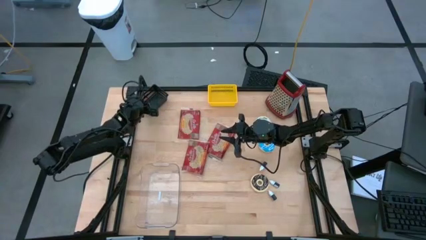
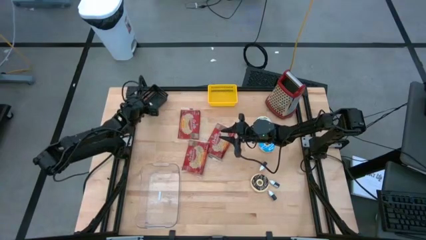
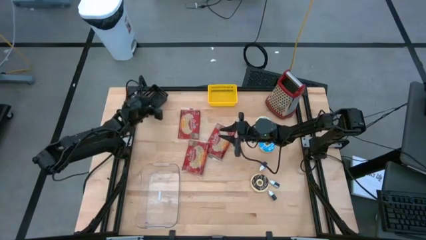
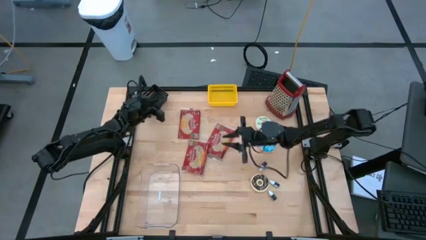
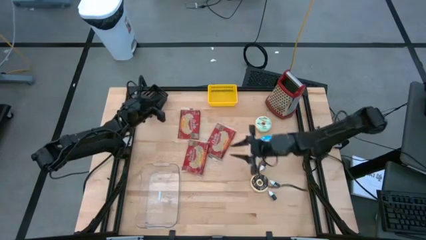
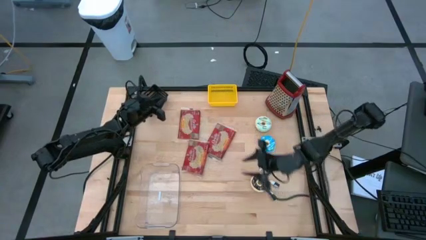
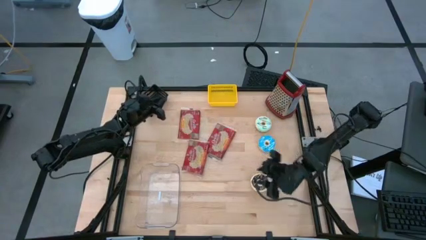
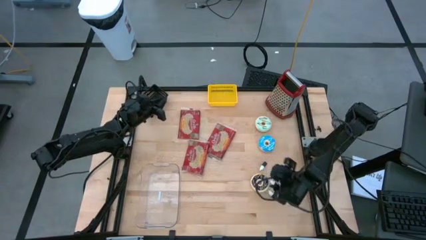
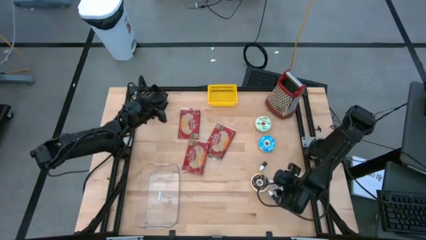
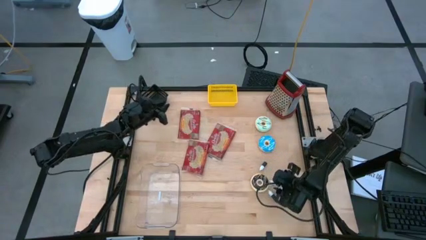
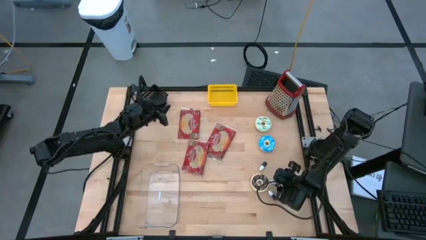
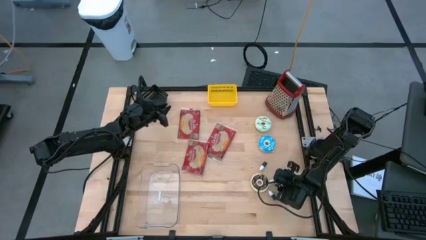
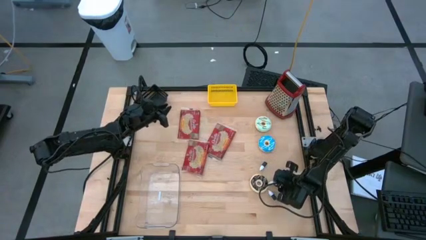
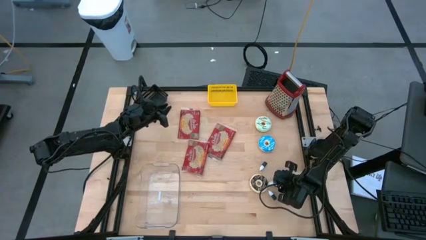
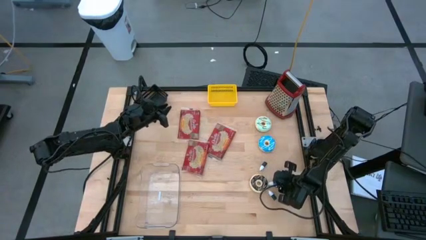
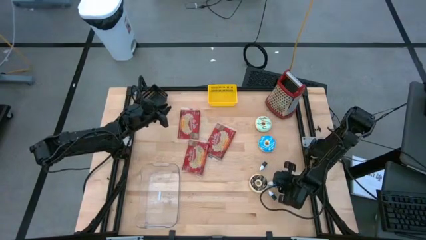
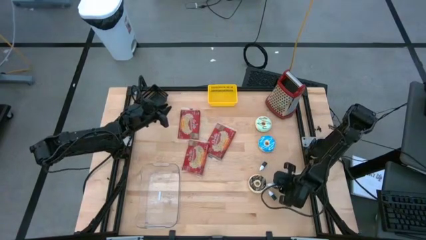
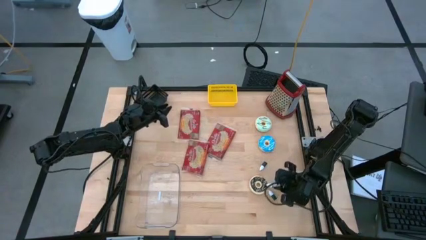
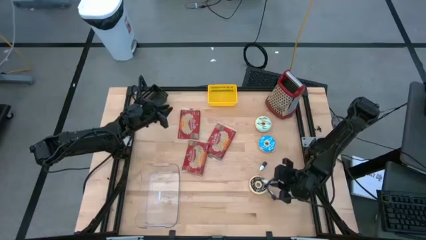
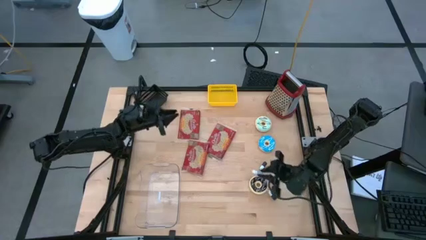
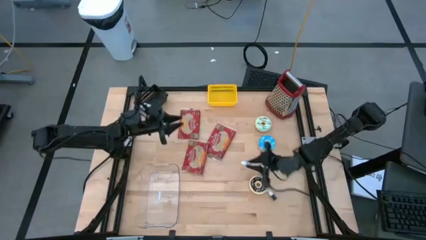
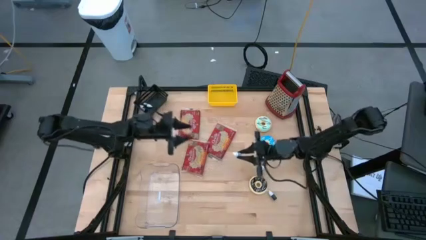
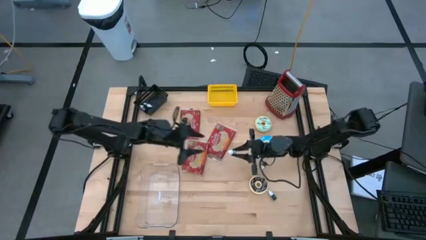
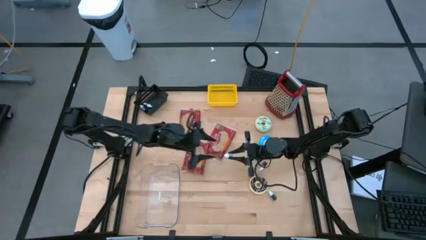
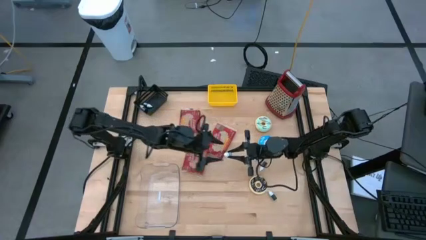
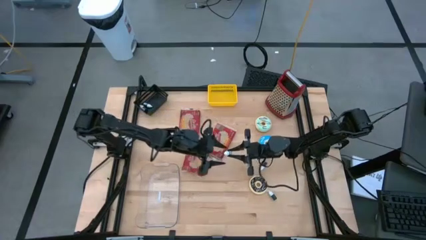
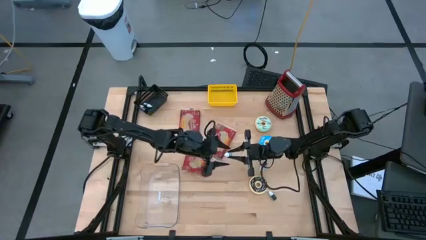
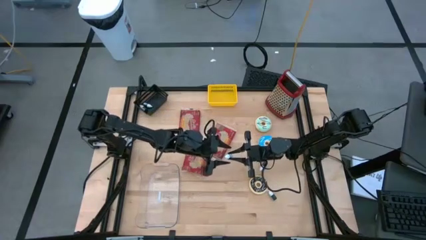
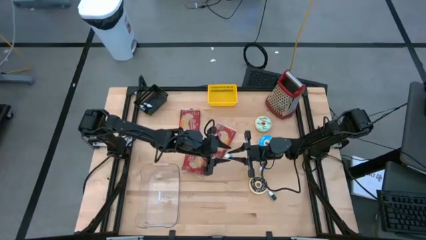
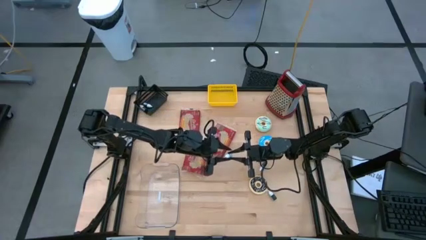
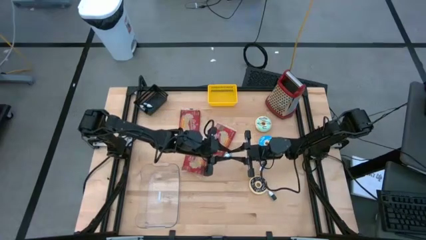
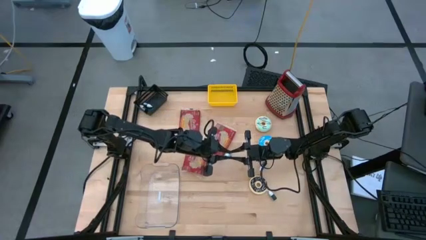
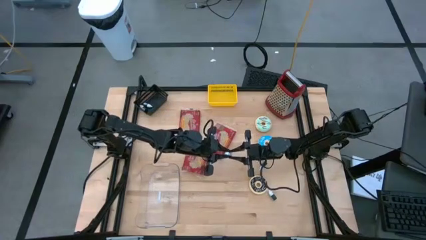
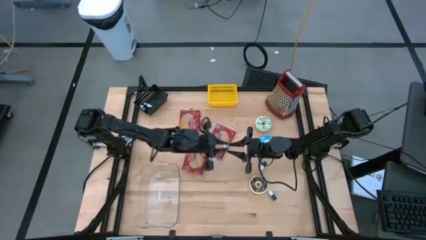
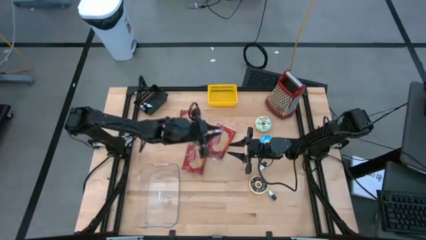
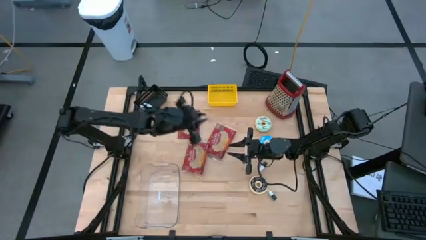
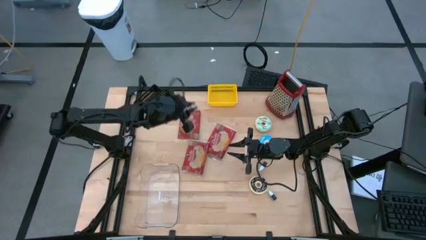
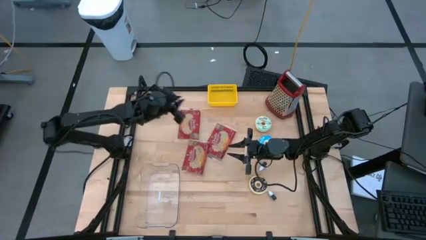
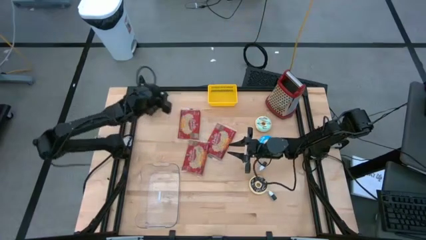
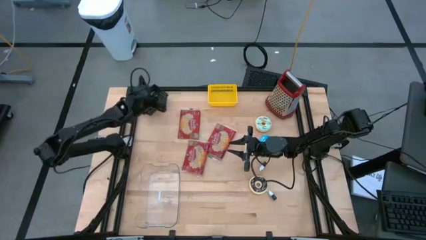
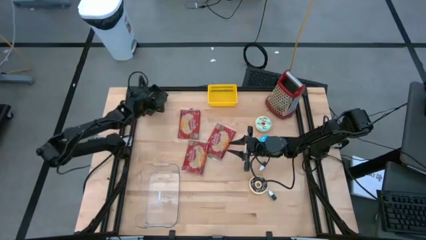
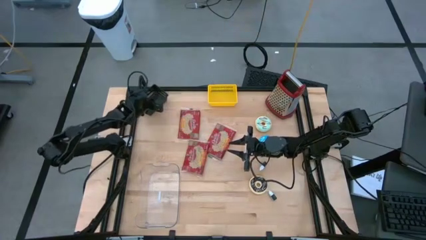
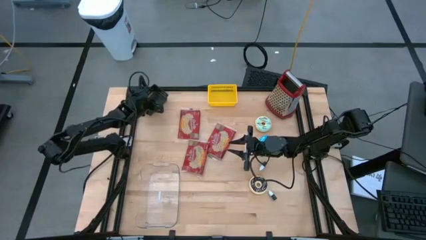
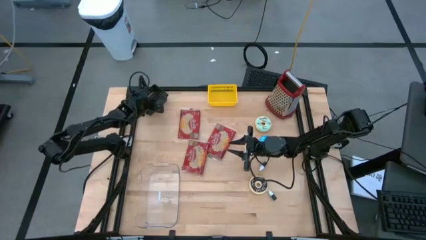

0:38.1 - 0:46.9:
Put the small blue food coloring bottle into the black bin

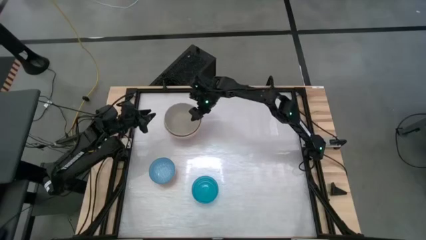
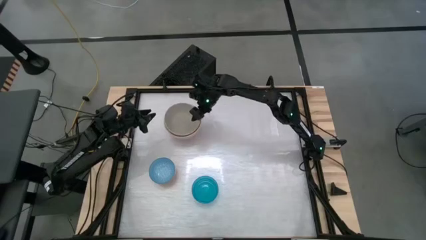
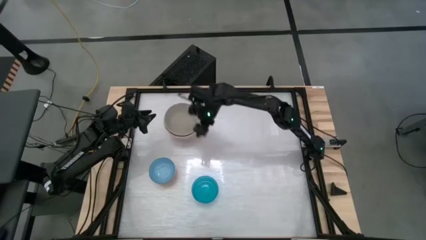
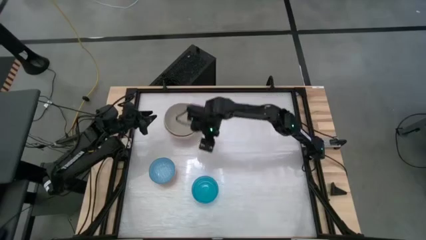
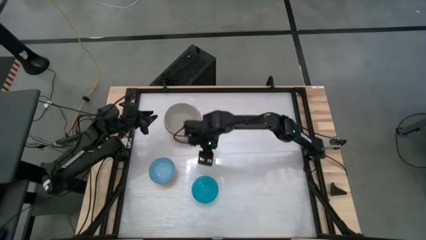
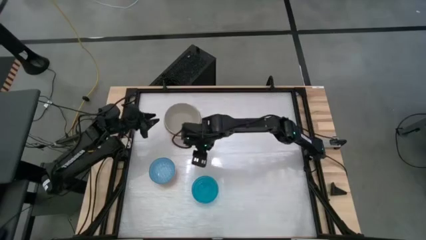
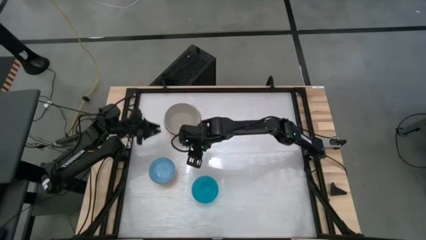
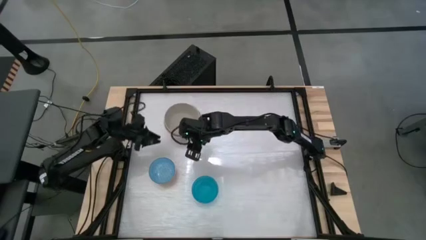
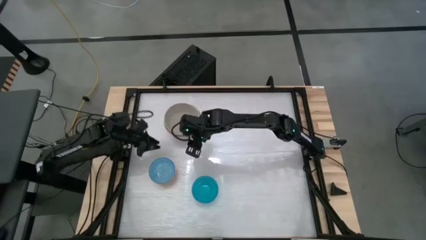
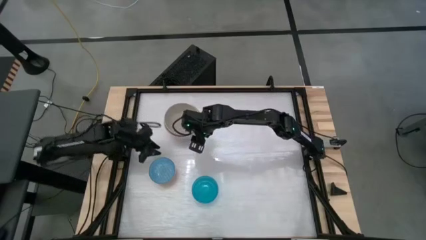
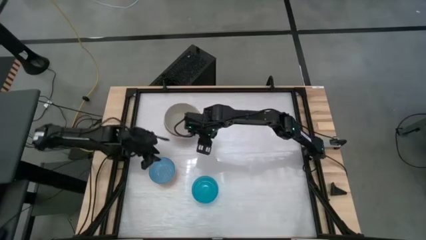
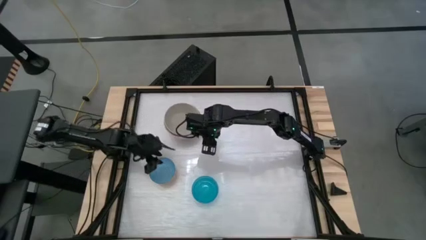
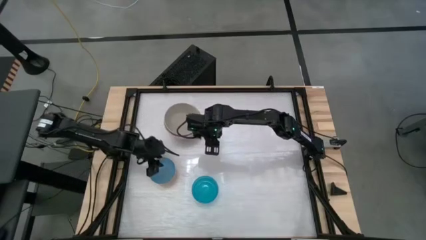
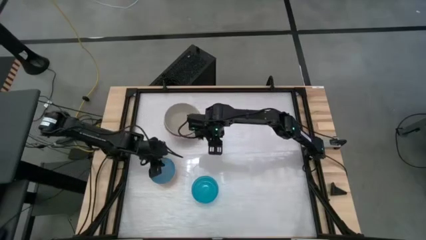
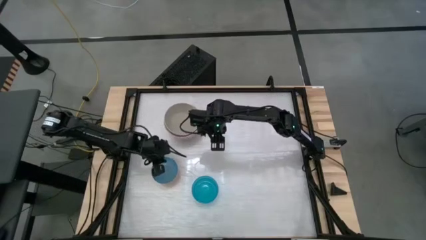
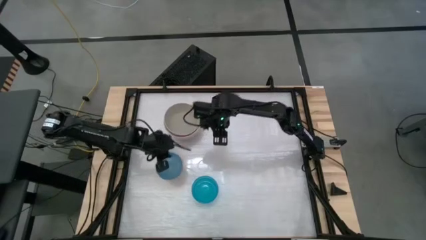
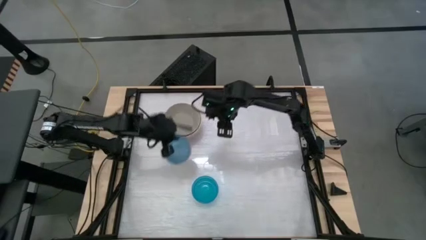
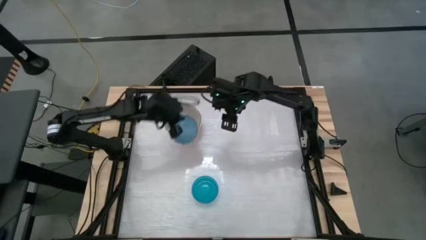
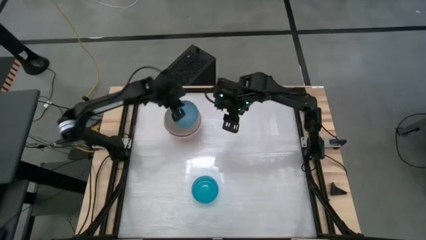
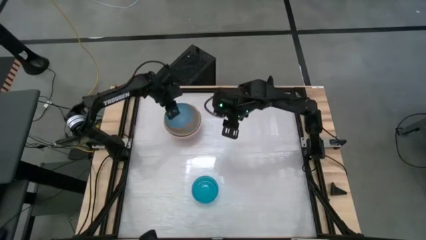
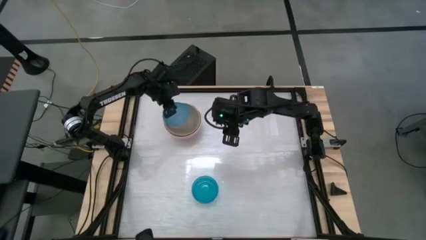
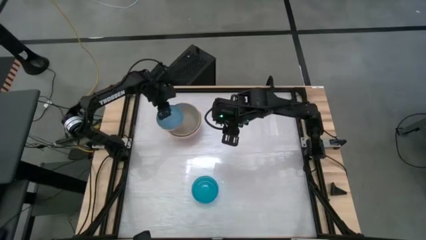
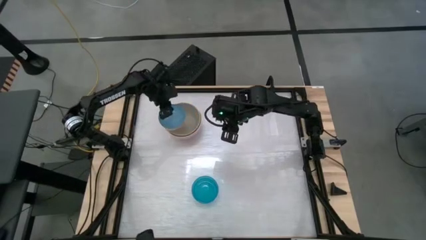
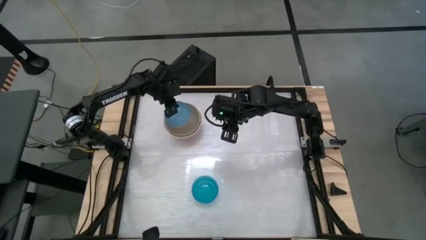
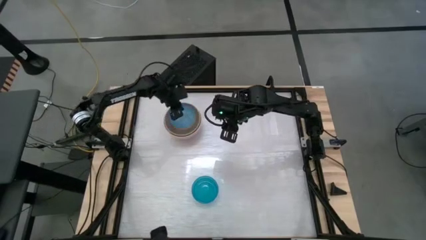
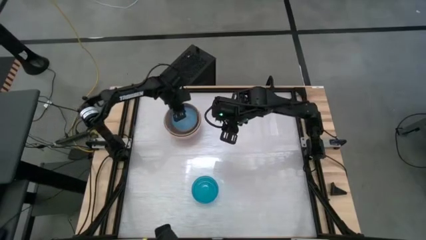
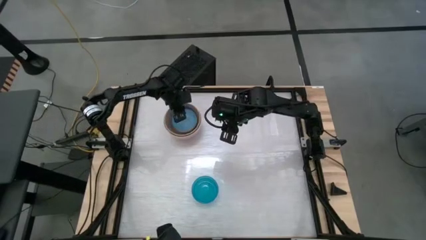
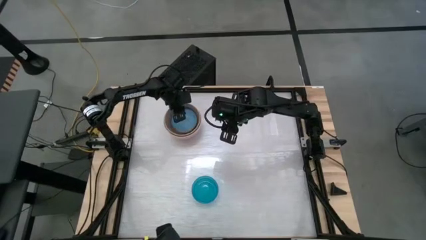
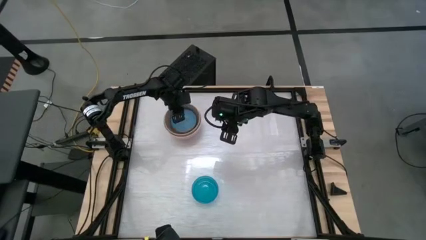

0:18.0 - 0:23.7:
Stack the orange-blue ceramic bowl on top of the gray ceramic bowl
